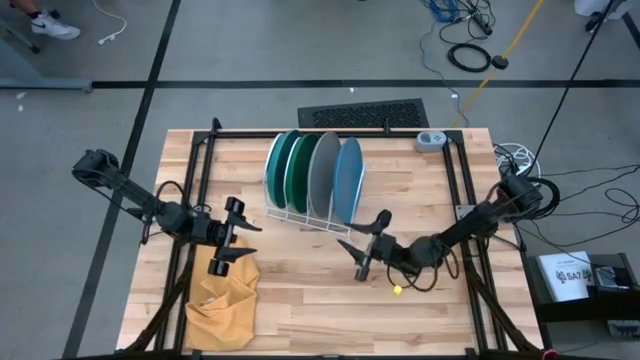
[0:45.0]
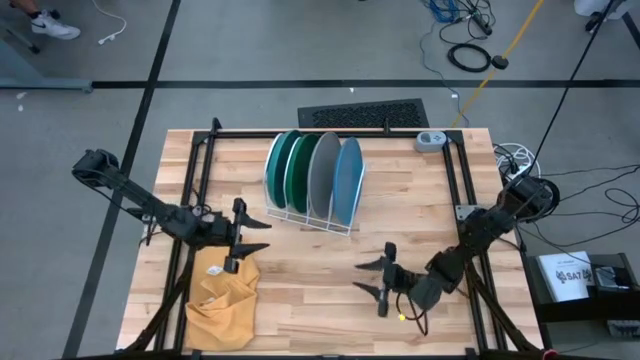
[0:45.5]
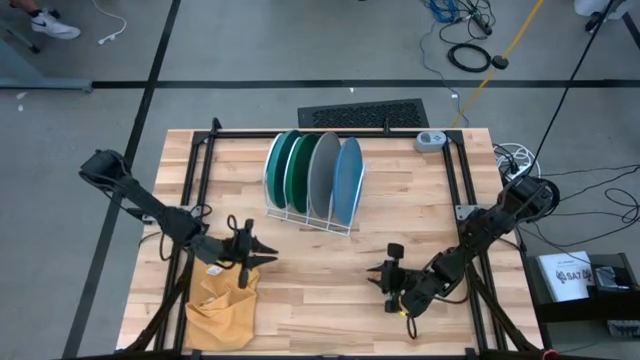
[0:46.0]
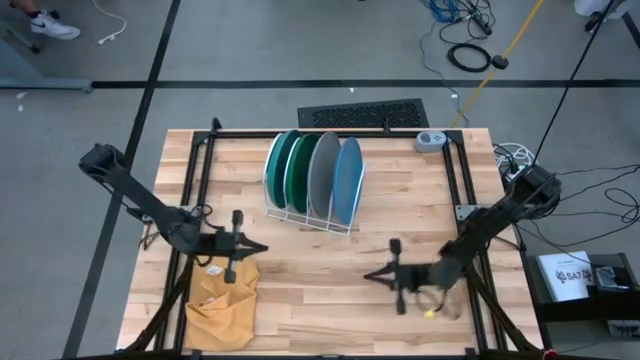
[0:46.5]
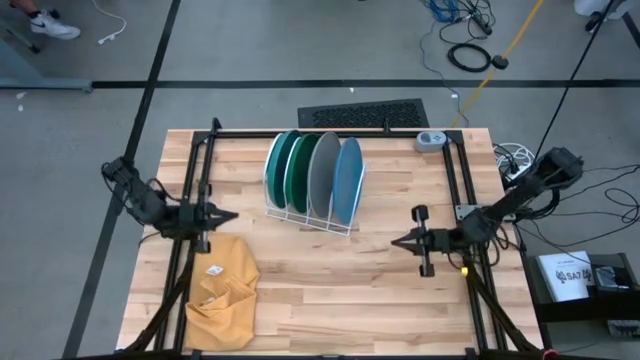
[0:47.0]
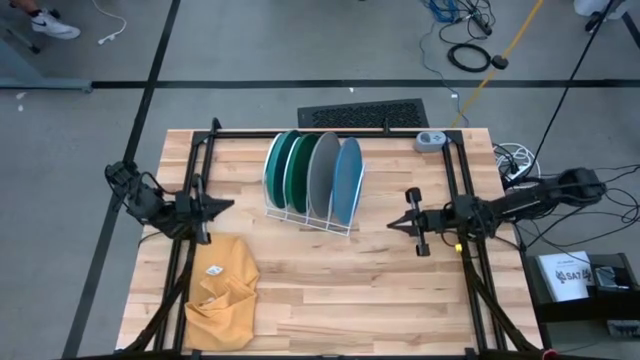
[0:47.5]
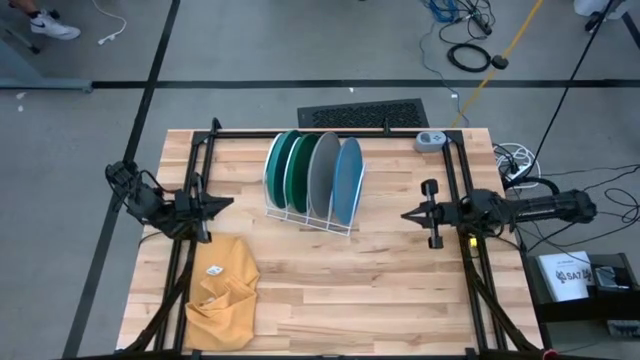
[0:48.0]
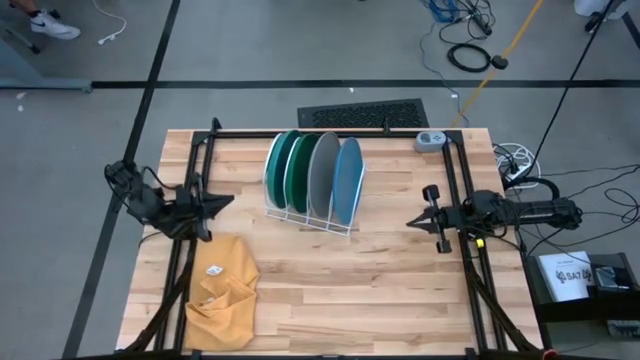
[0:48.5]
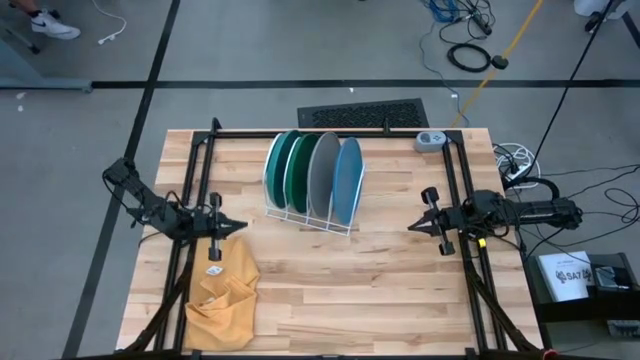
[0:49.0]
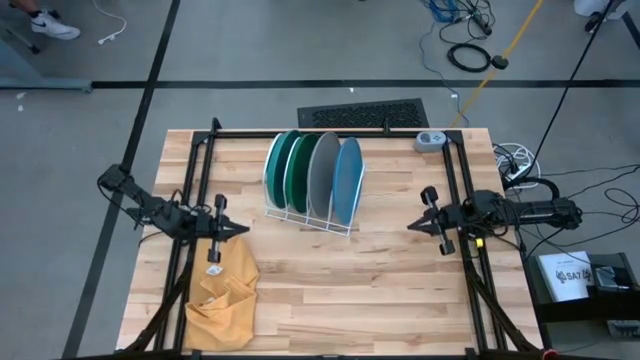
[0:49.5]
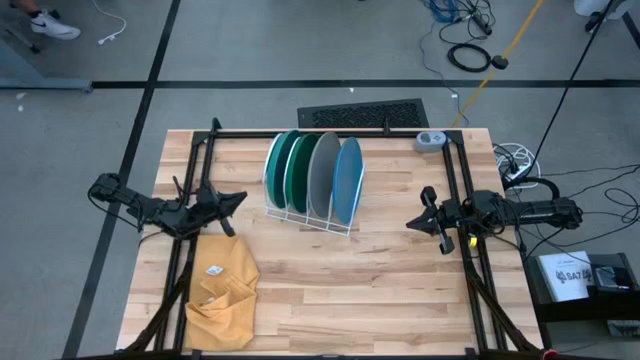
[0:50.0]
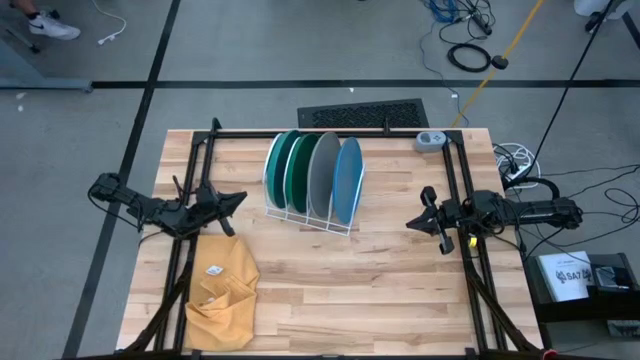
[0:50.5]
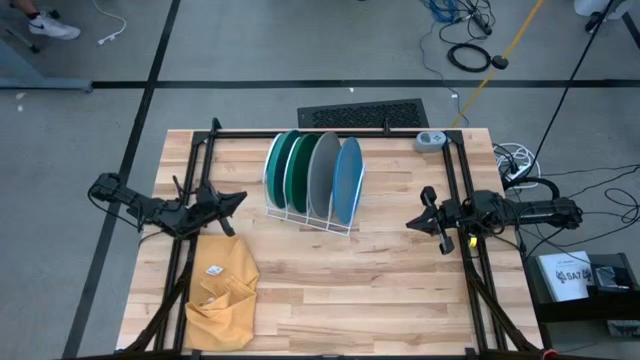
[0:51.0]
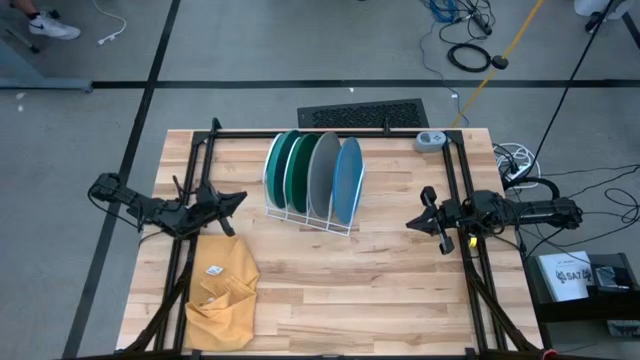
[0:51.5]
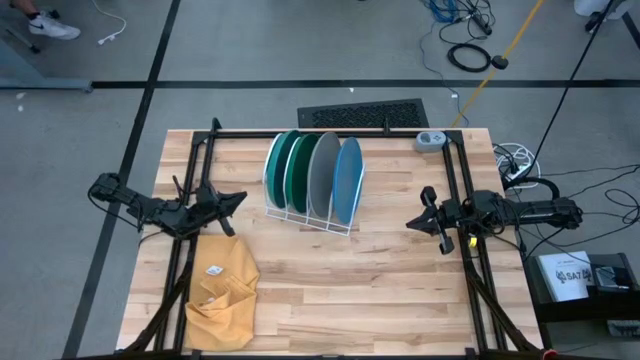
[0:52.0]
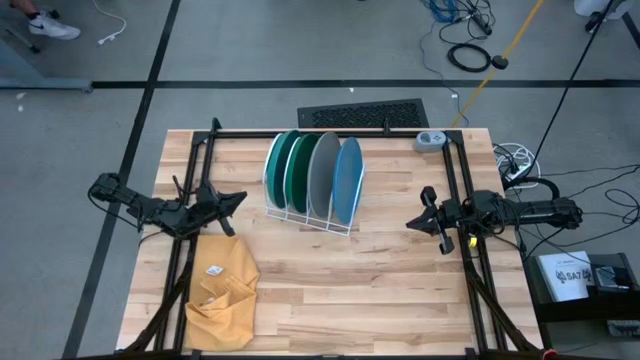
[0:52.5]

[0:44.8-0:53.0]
Task: Sort dishes
Return to home position

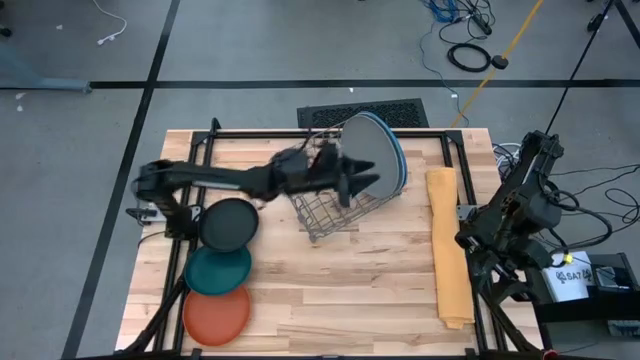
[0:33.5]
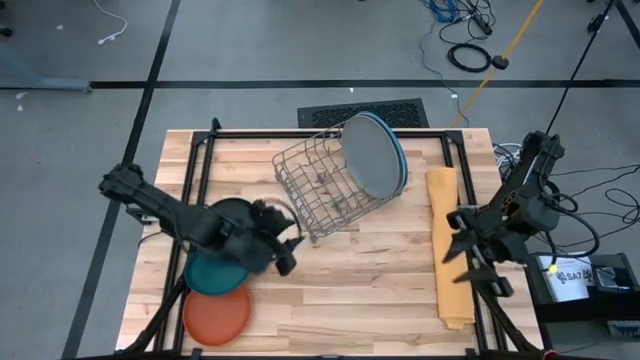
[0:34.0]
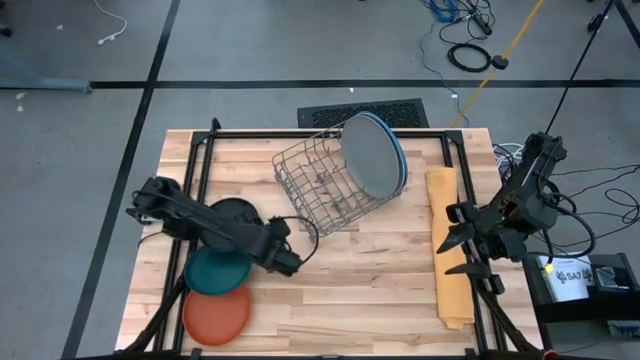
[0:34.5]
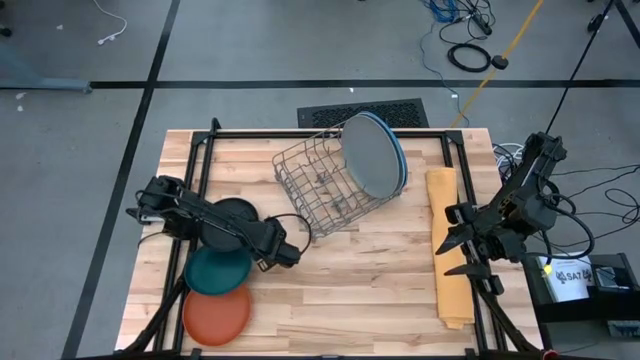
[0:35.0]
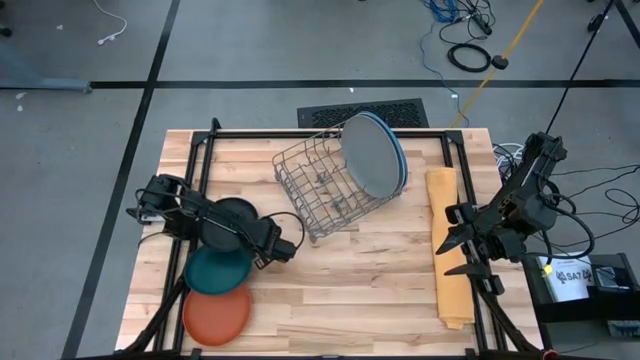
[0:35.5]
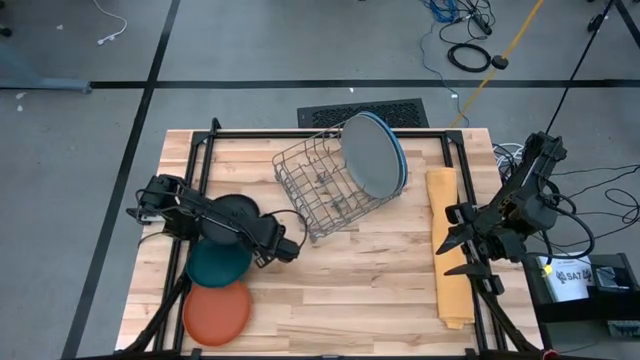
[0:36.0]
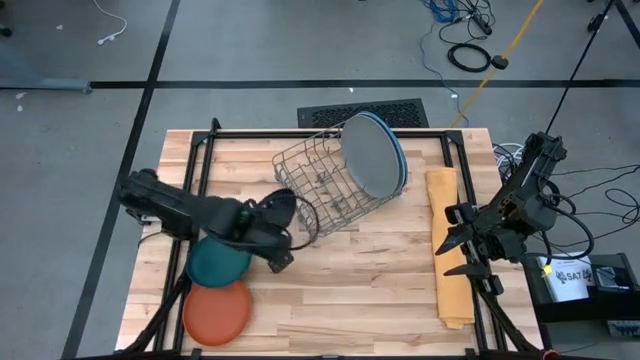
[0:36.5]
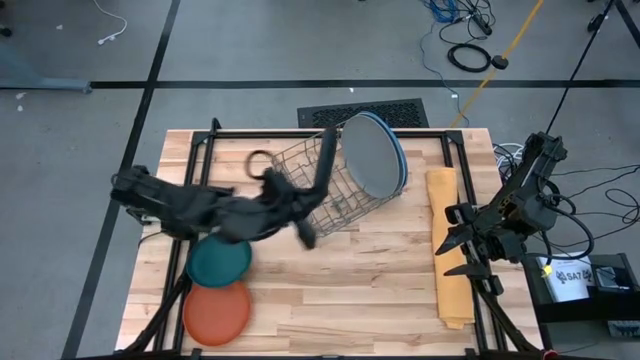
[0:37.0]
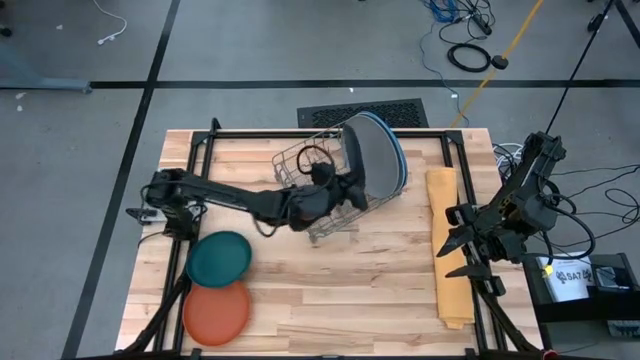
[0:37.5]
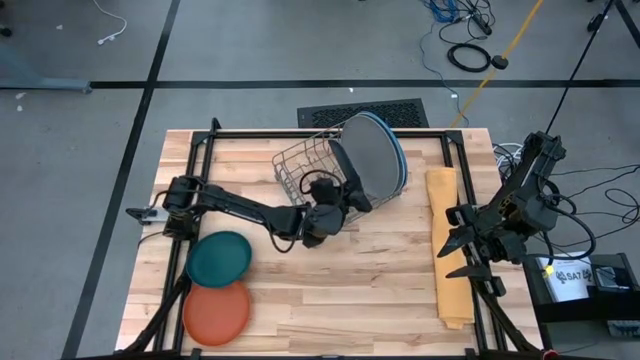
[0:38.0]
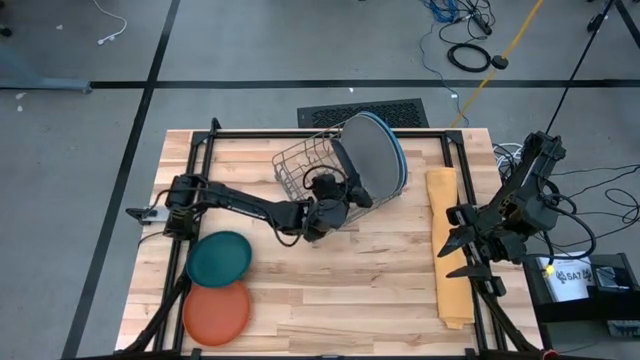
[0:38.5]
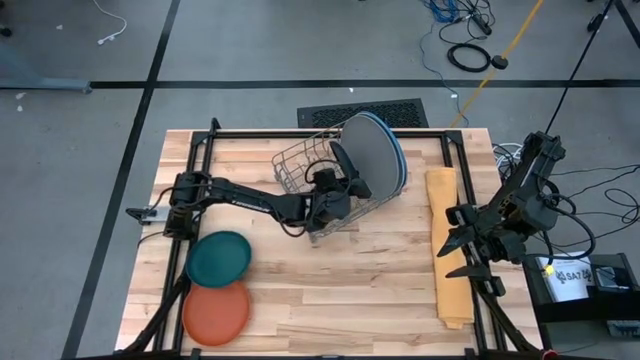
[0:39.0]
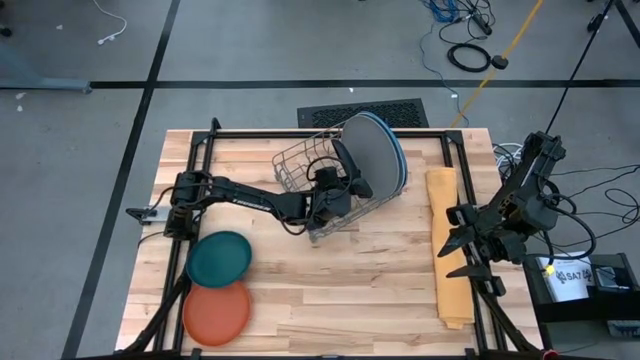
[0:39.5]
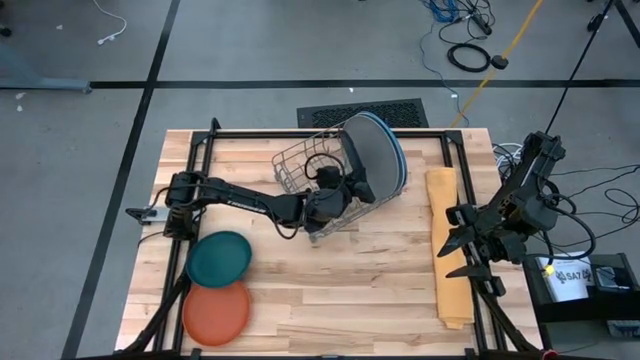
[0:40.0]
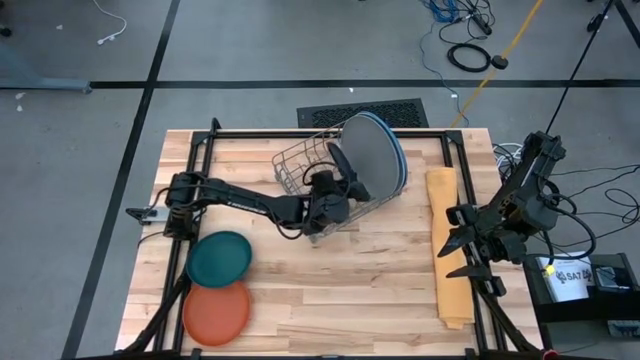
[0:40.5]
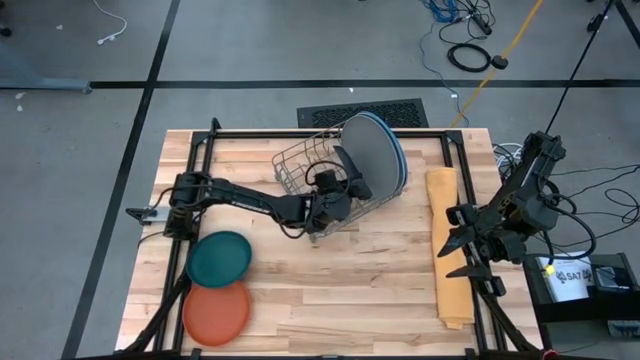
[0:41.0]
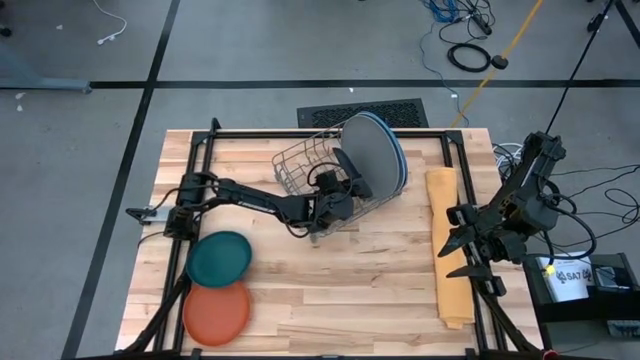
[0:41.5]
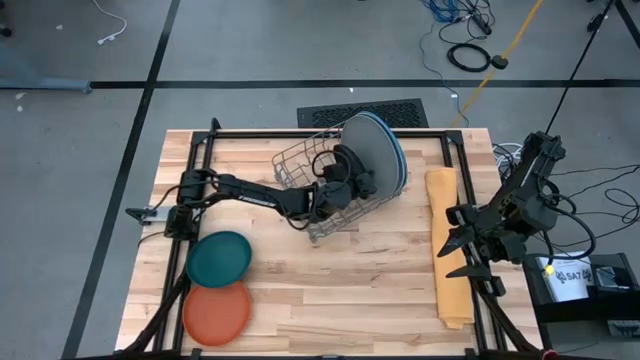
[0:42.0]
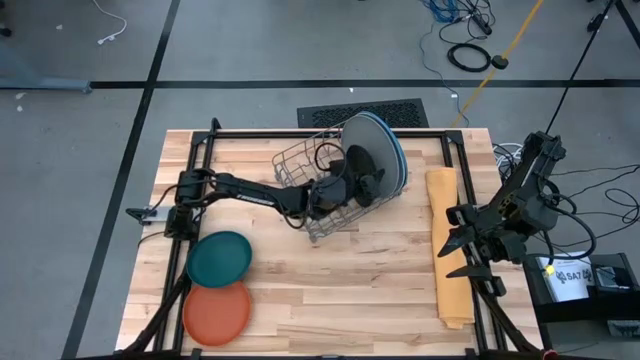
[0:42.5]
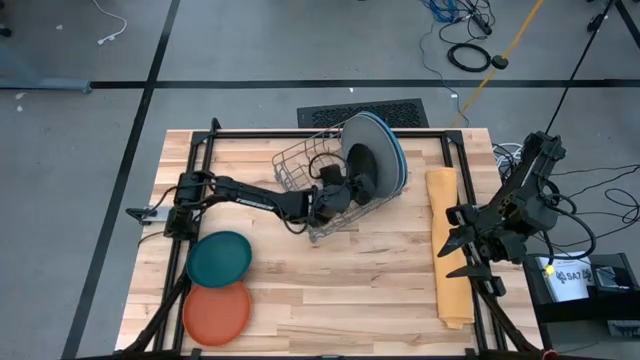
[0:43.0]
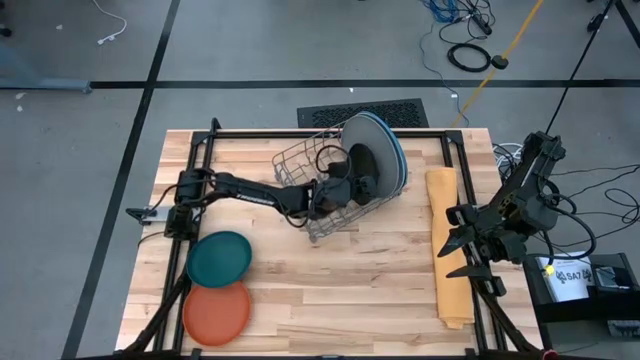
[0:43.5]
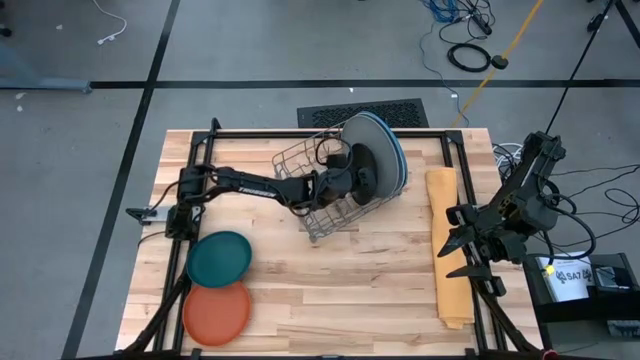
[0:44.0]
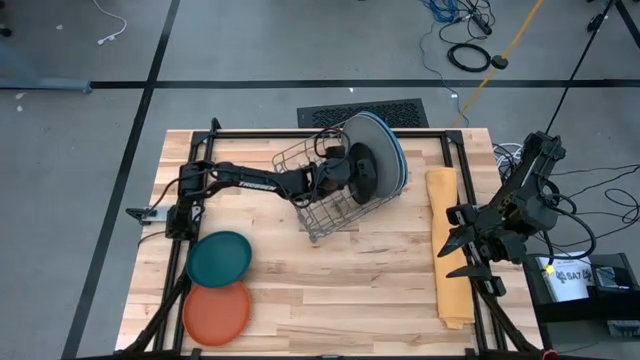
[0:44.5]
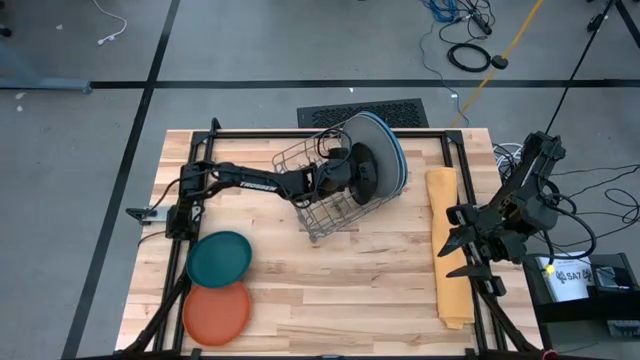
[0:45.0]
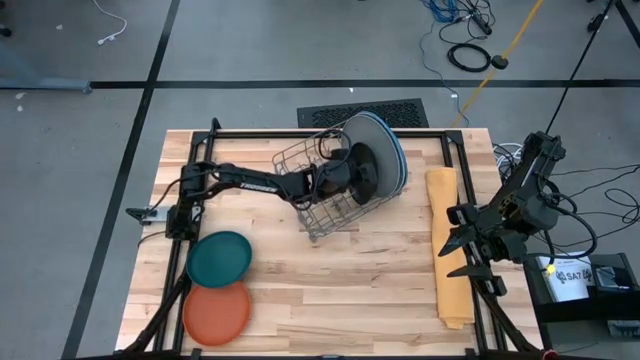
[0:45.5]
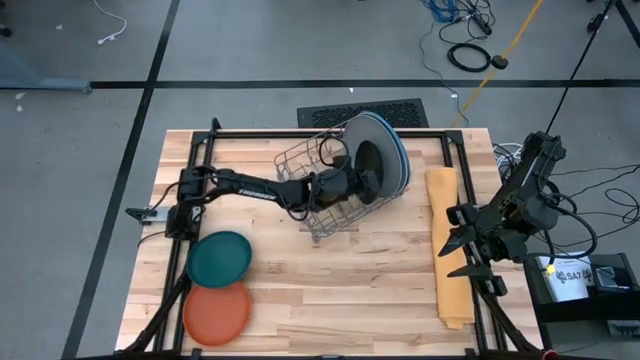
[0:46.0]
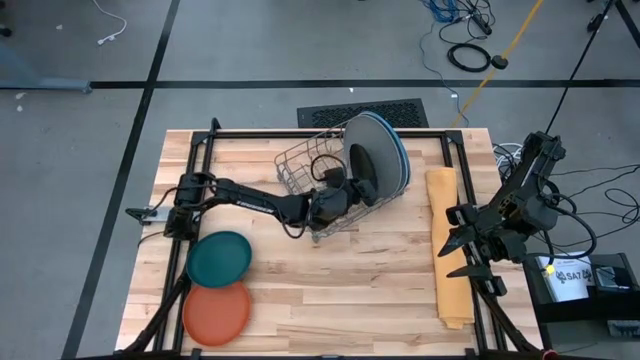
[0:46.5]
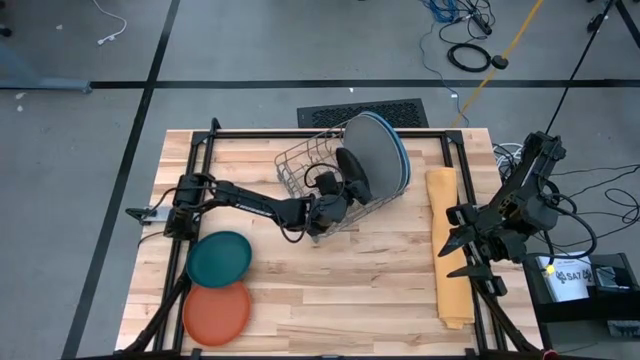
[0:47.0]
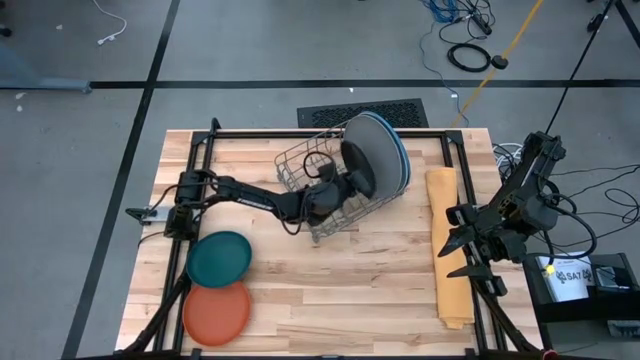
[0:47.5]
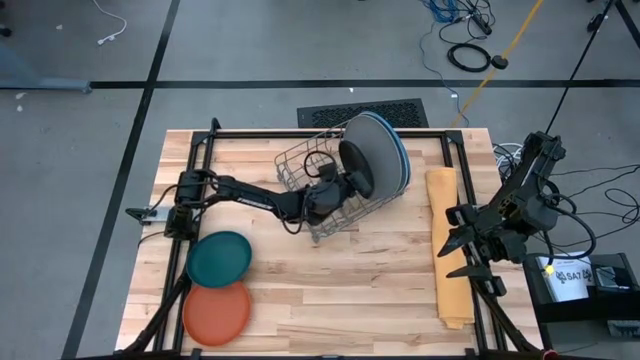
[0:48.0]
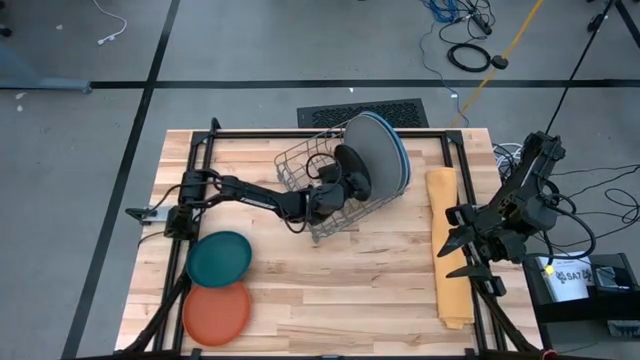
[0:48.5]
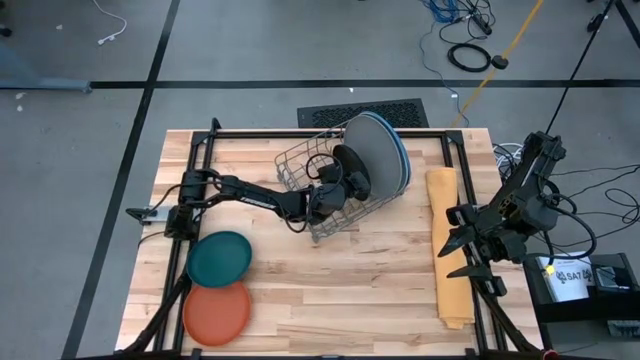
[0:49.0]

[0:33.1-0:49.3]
Task: Sort dishes
Put the black plate into the dish rack
